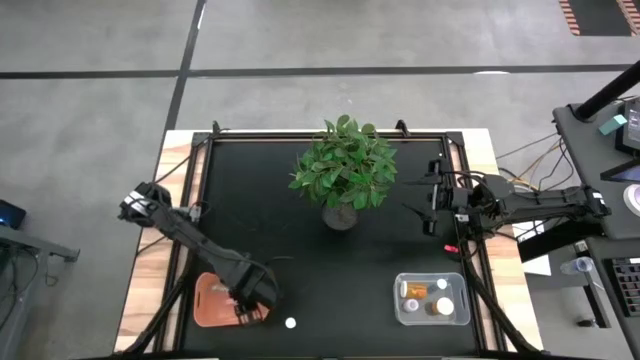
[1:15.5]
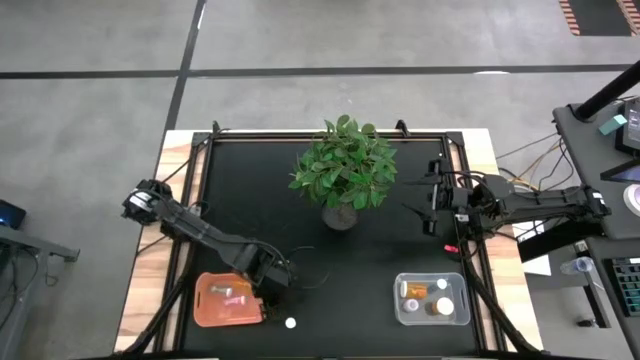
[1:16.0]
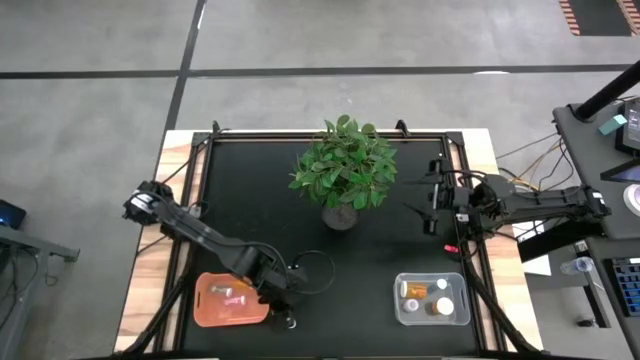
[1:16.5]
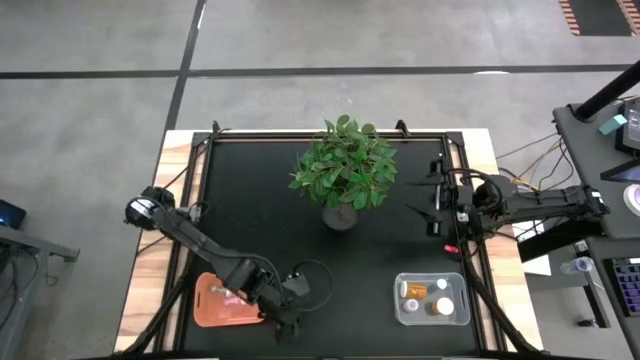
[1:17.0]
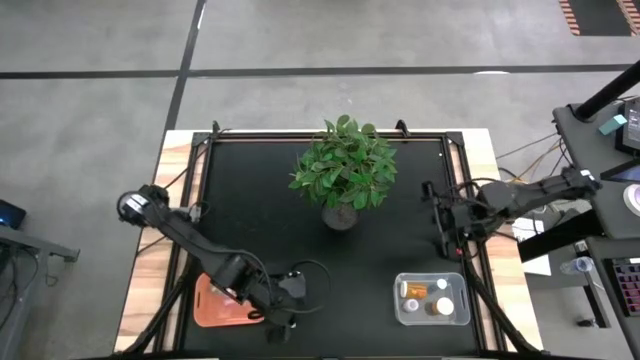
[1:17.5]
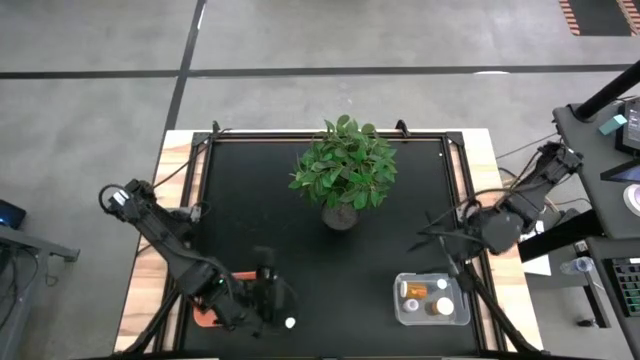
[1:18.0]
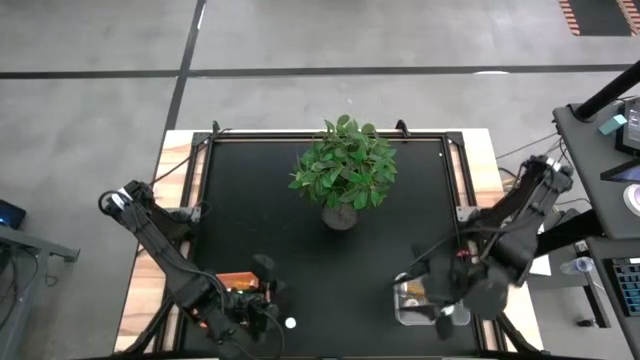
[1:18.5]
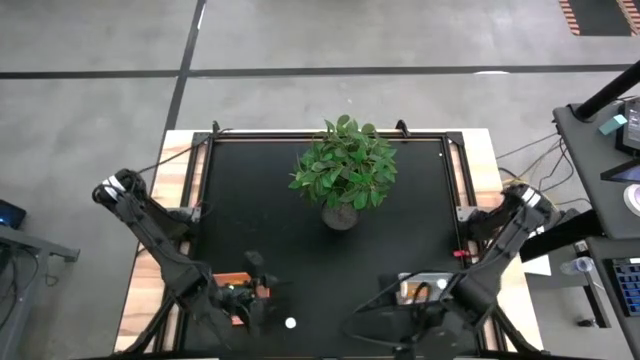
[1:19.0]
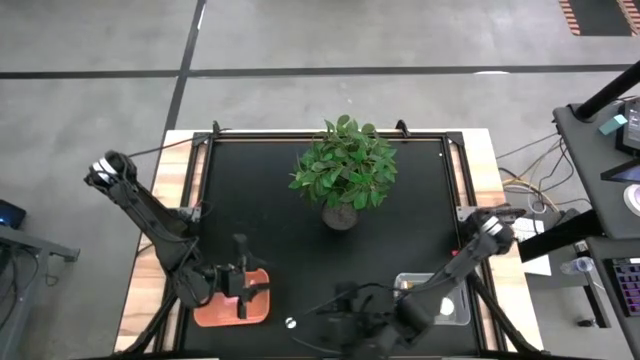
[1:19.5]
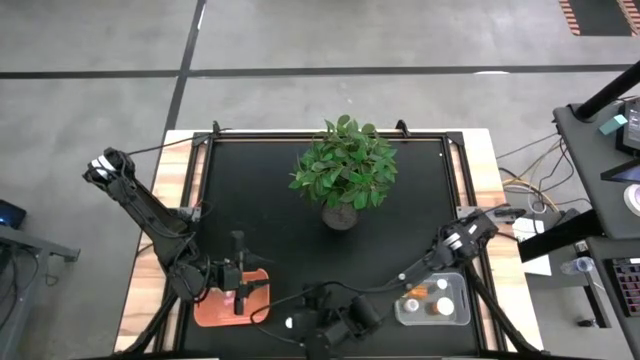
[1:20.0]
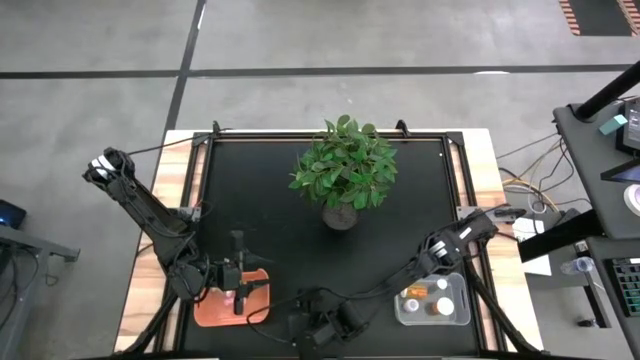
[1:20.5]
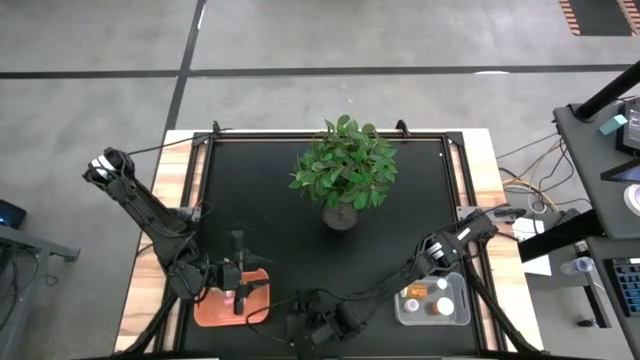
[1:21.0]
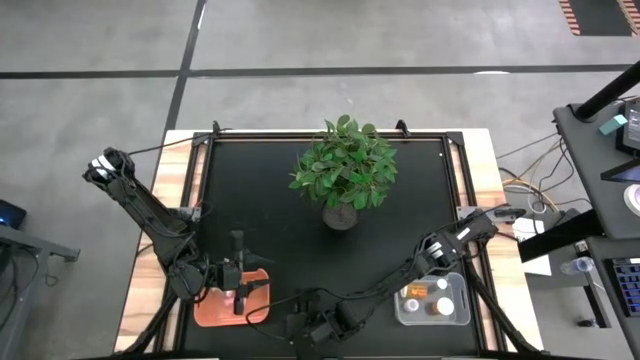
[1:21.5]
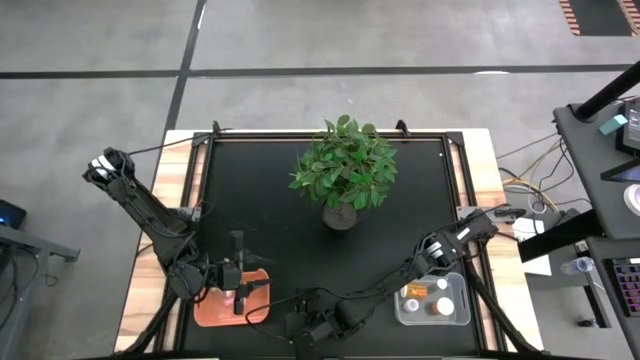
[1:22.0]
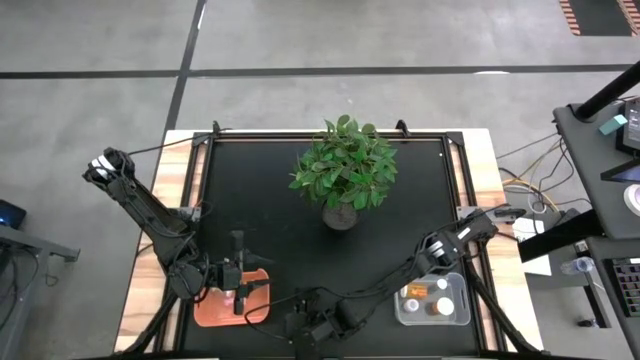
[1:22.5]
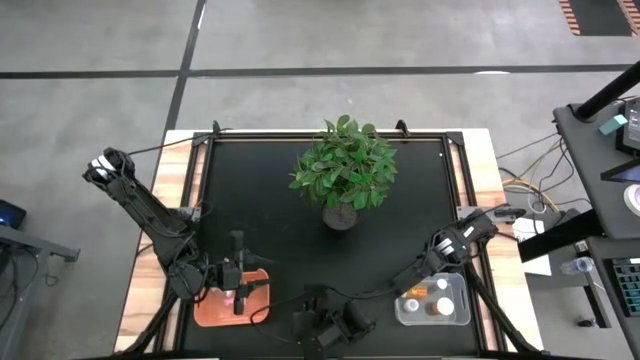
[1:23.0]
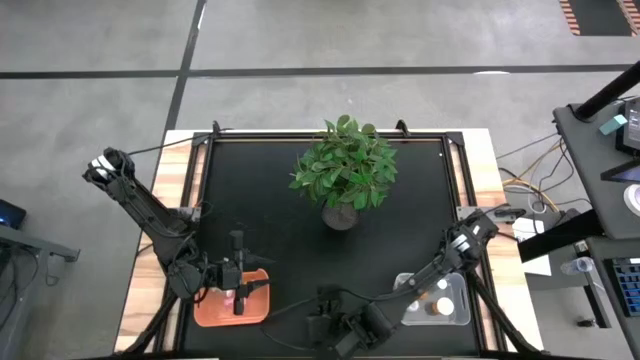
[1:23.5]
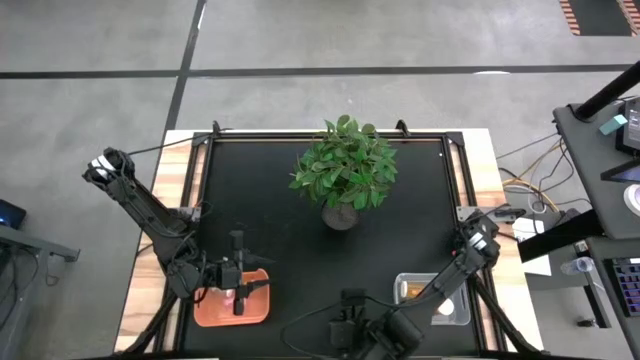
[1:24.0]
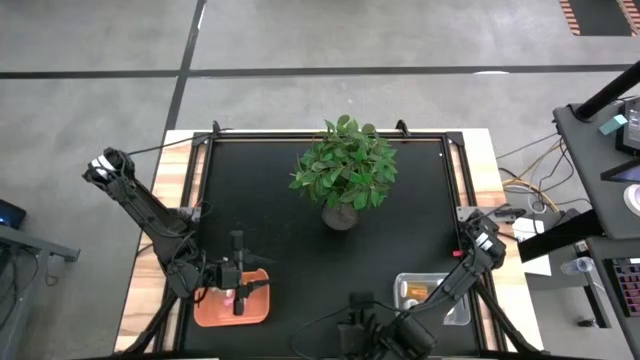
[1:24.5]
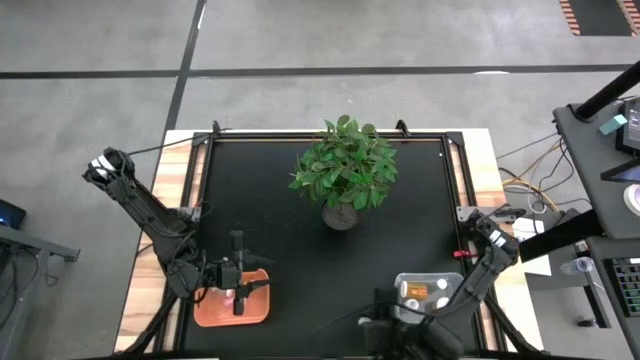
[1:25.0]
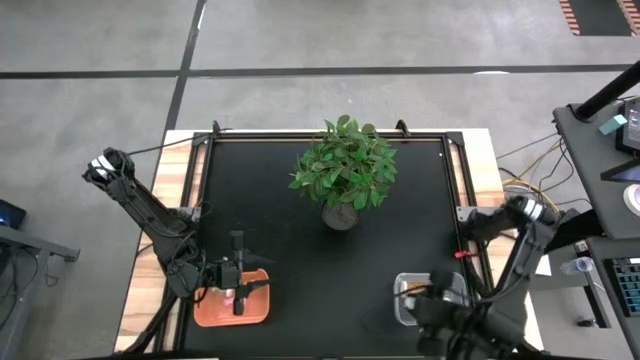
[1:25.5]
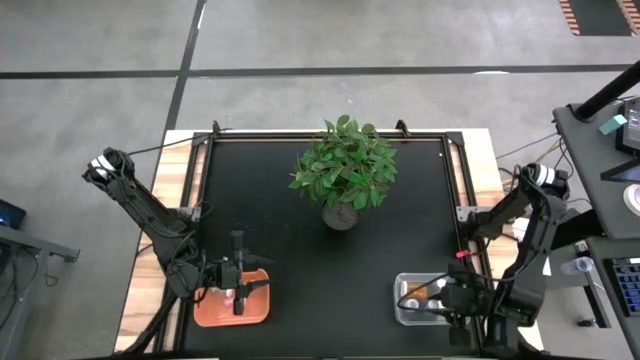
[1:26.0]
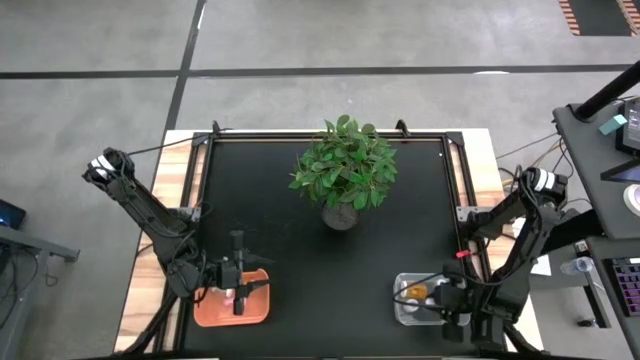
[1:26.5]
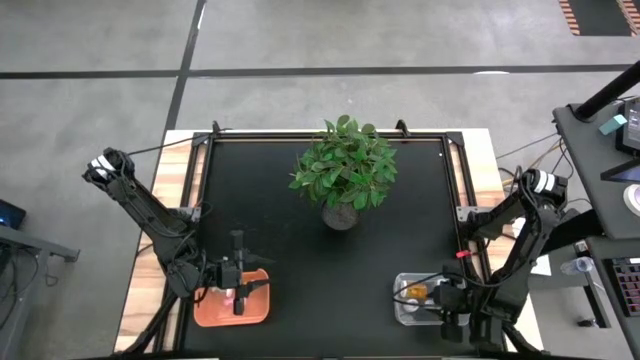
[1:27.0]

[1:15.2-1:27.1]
Task: Pick and place medicine bottles into bin by pill shape (circle, oval)
Put the bottom blue capsule bottle into the transparent bin

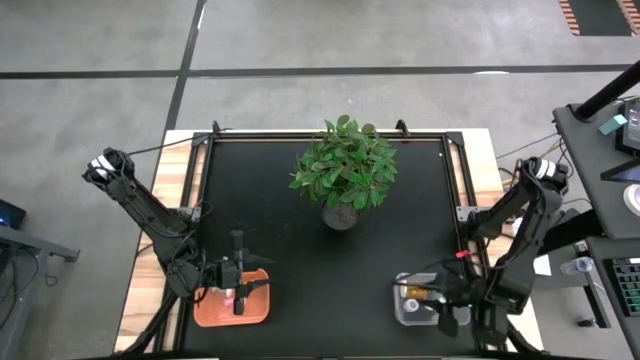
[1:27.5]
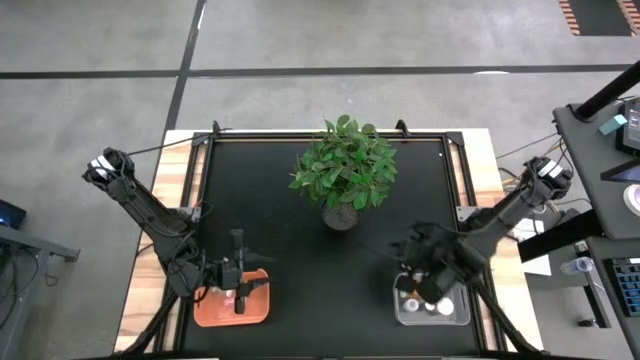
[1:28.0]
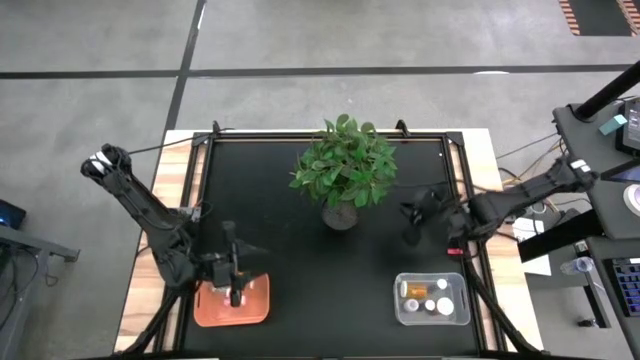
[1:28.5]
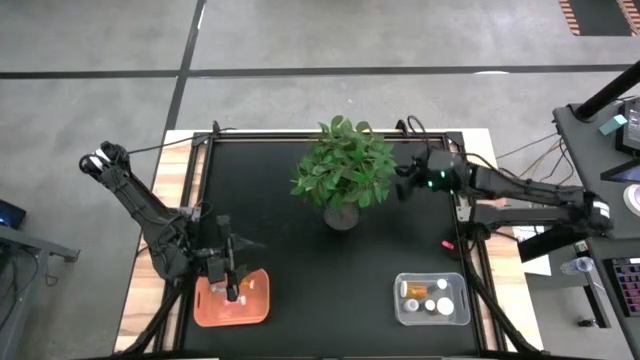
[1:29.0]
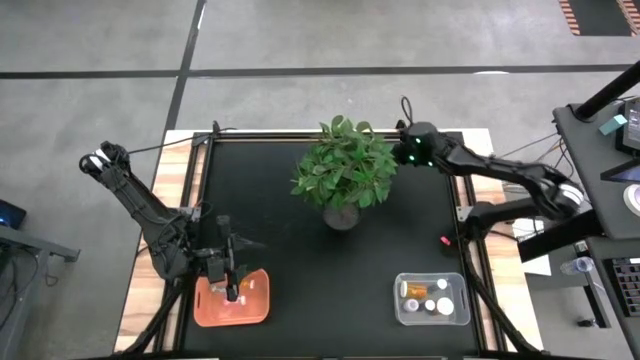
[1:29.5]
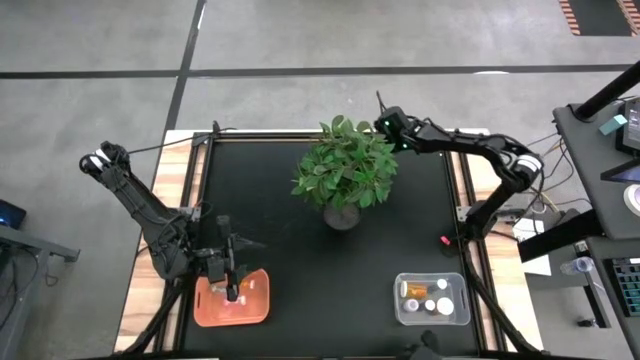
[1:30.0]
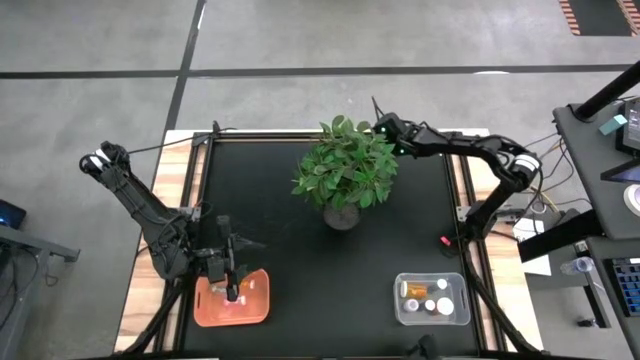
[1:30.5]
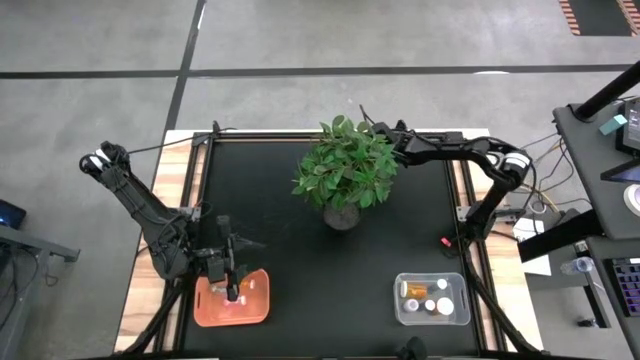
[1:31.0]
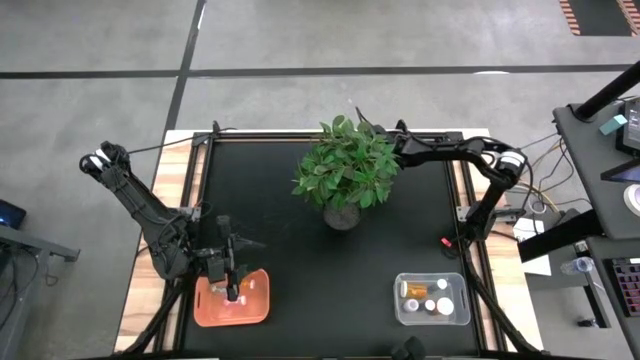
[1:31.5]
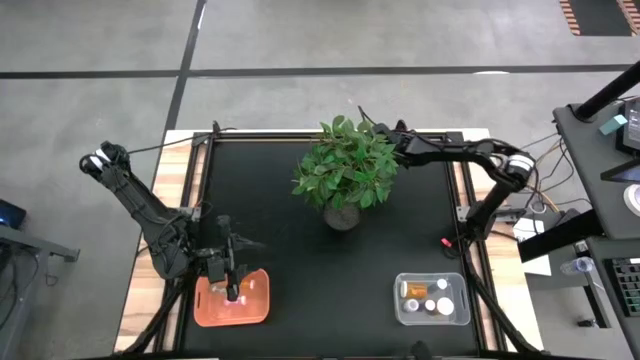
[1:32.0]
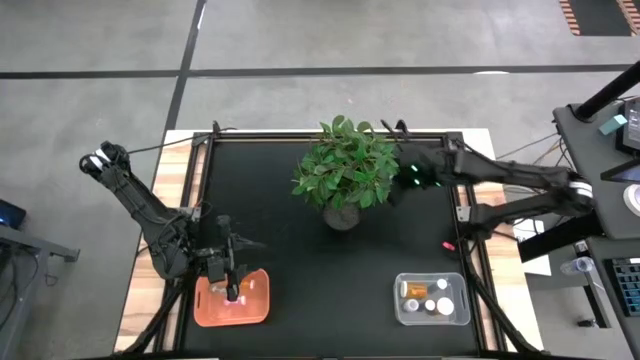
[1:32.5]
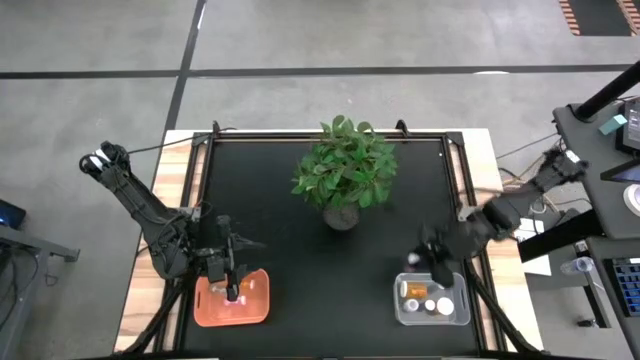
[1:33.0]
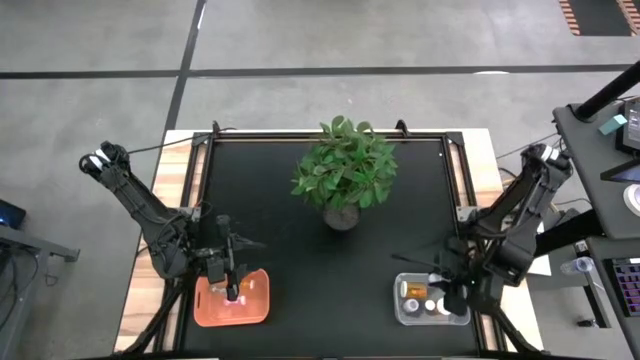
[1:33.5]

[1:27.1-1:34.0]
Put the blue capsule bottle into the transparent bin

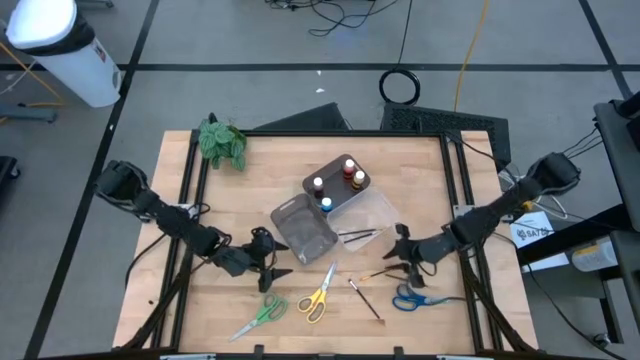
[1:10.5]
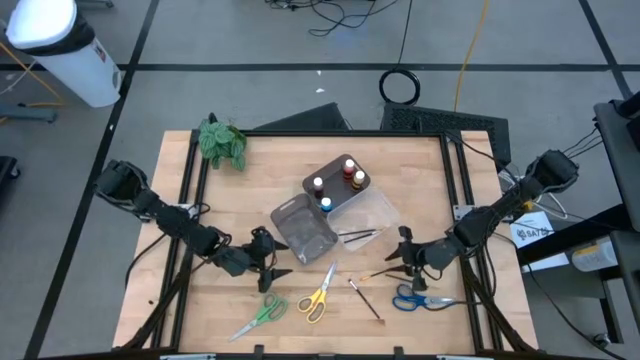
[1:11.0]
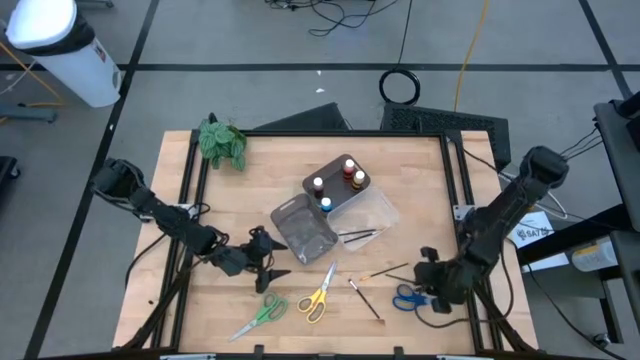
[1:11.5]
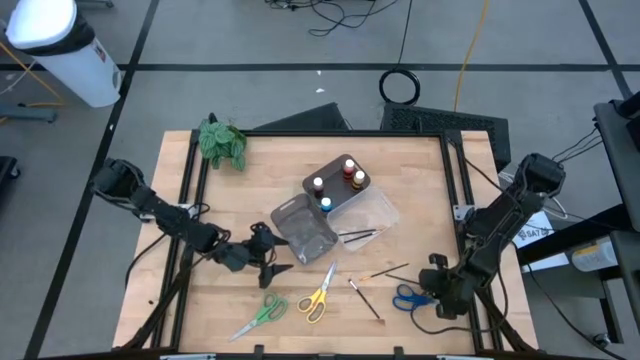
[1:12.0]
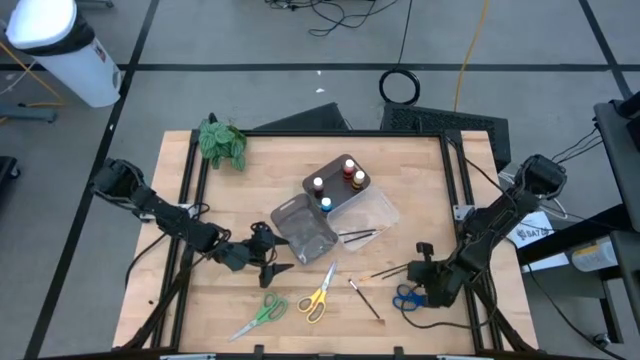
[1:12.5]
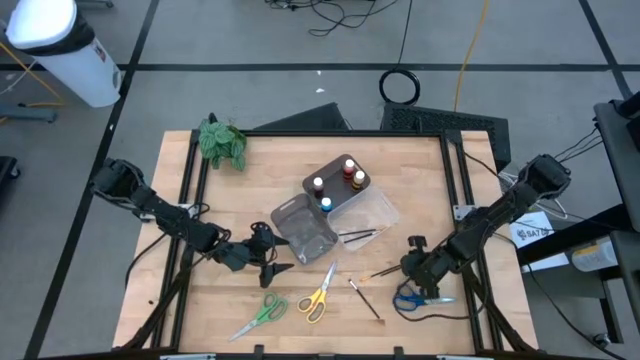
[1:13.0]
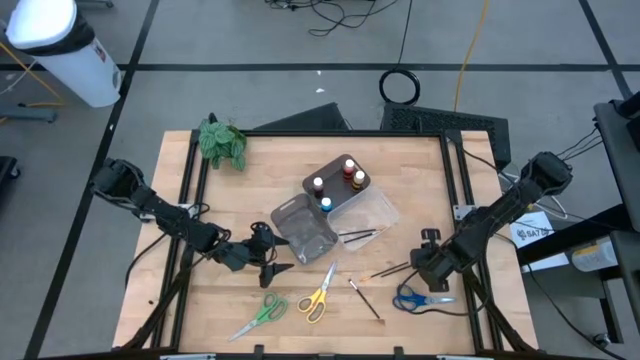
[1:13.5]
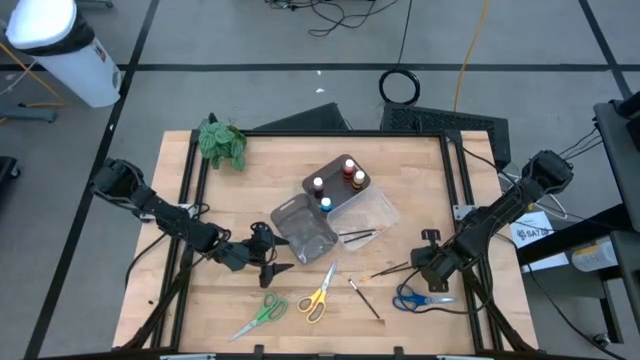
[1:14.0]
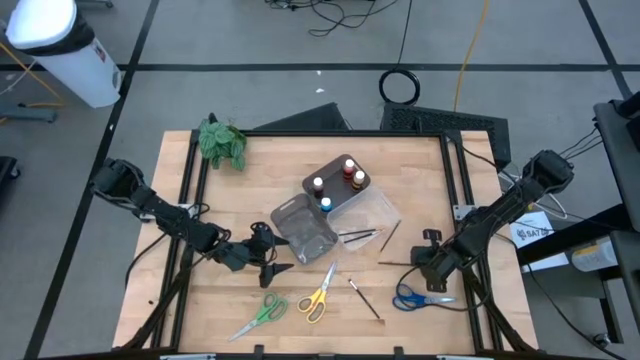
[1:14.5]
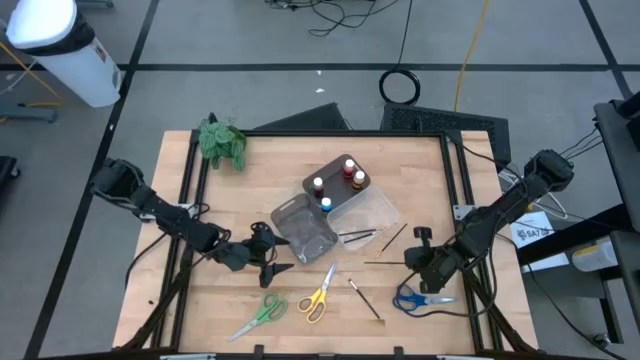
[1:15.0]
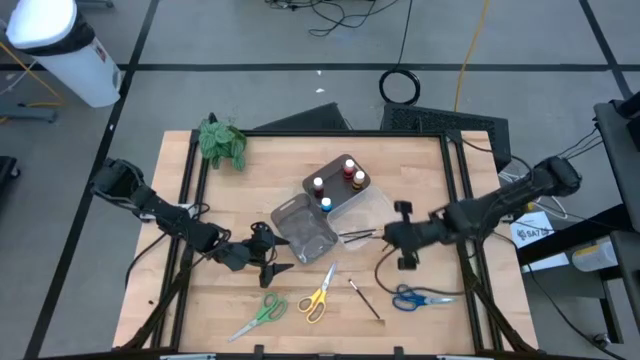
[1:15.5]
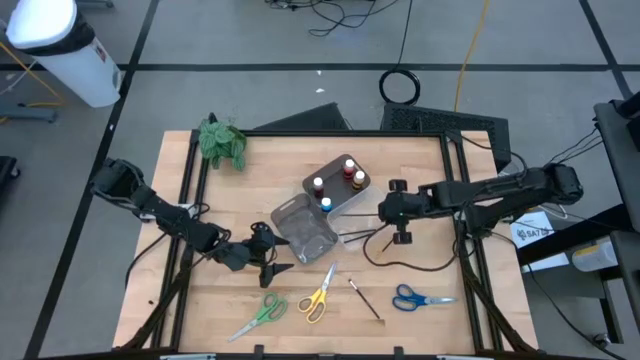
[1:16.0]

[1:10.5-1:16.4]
Task: Pick & Place Paint Supplies
Put the bottom gold paintbrush into the transparent bin
